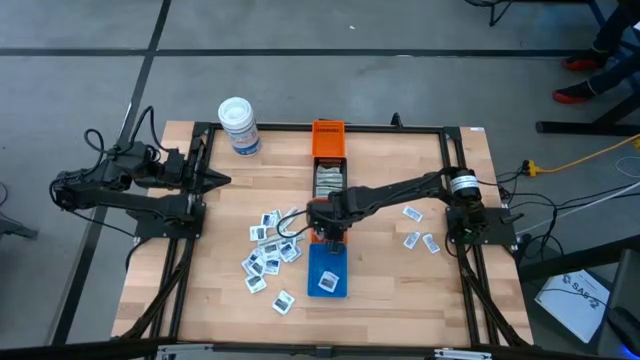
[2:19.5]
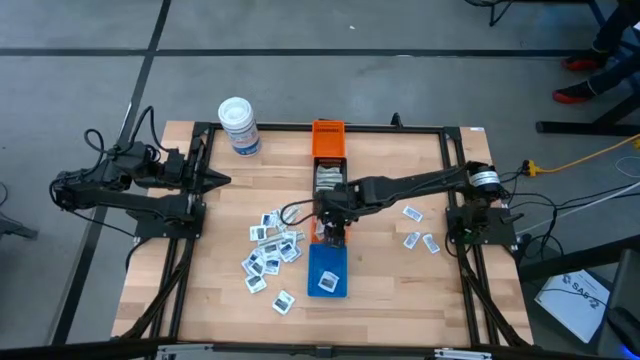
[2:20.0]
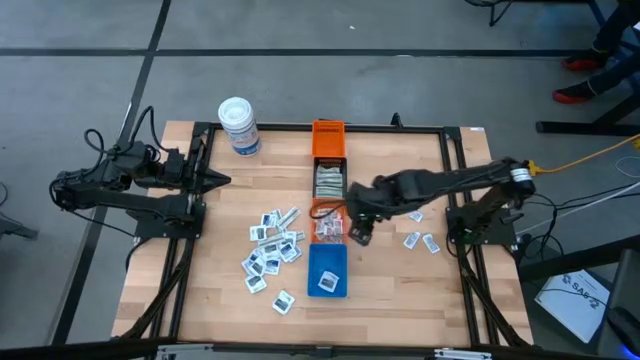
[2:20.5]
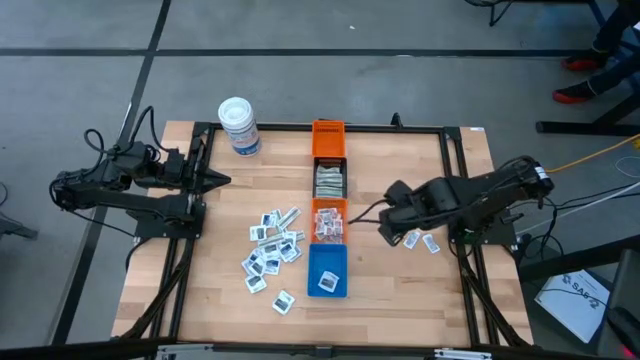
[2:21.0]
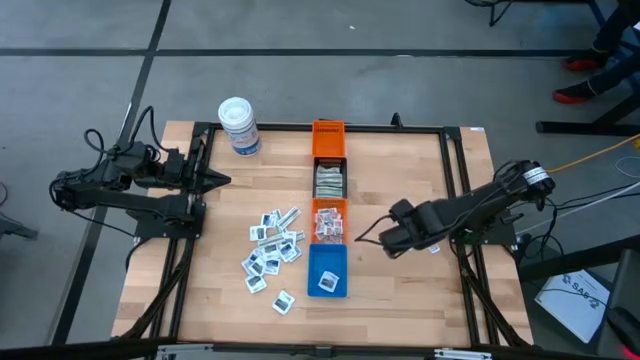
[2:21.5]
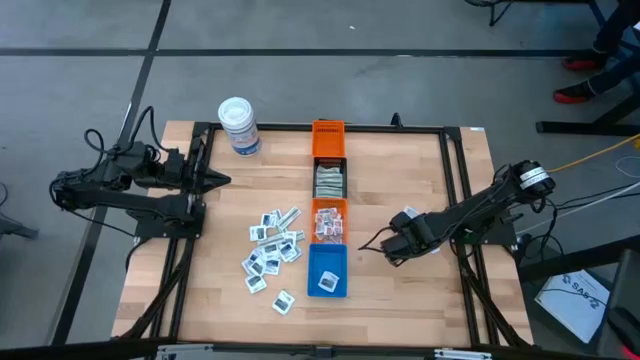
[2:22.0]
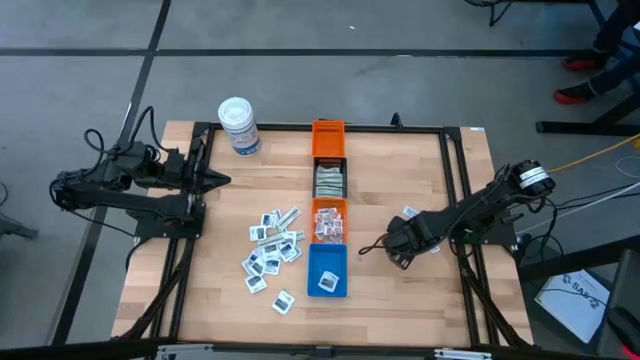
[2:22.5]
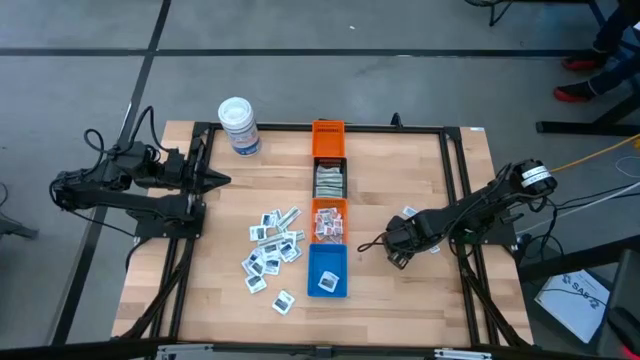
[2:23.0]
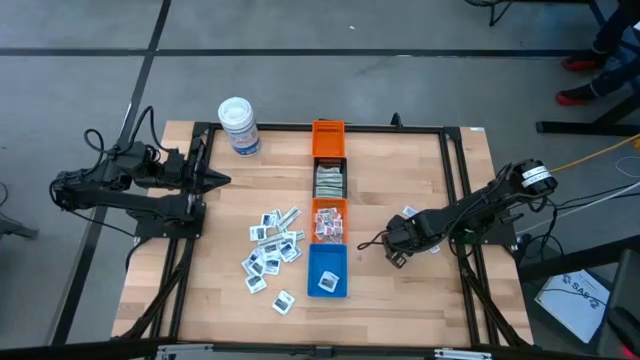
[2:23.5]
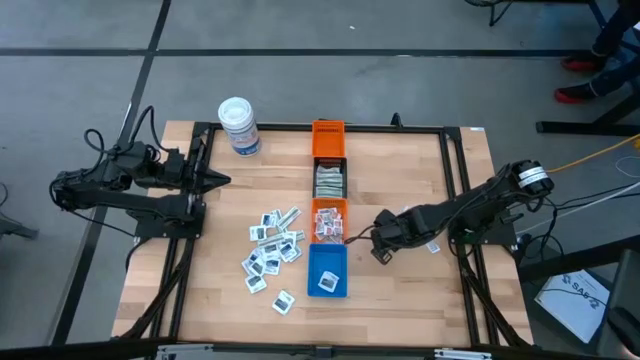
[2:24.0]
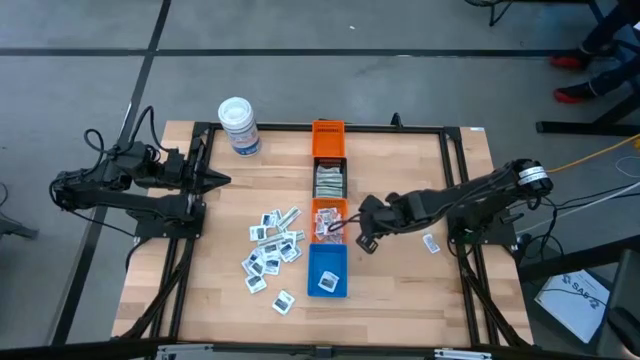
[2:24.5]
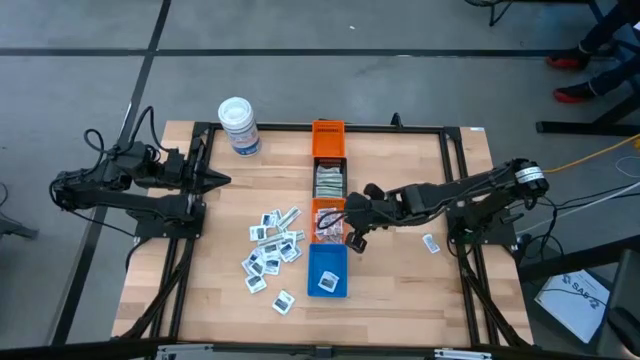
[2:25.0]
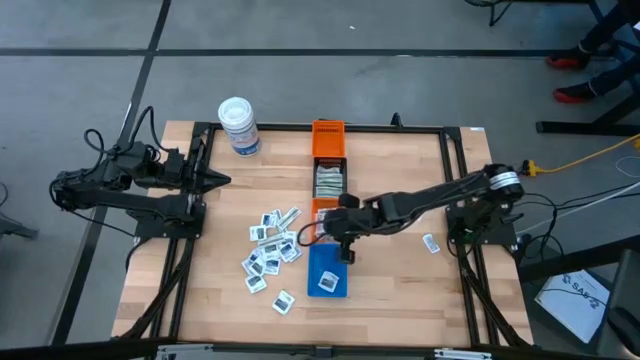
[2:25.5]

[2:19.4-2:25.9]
Task: Pick & Place First Aid Supplies
Put the orange ointment pack into the bottom orange bin

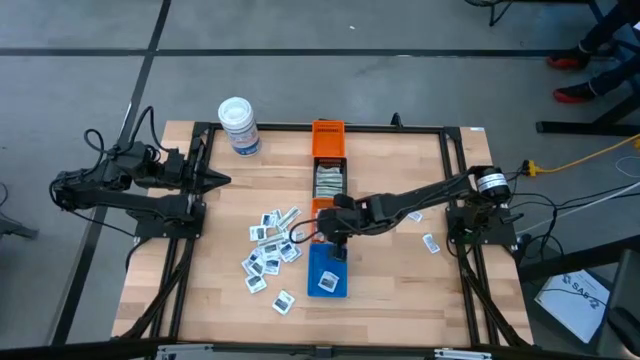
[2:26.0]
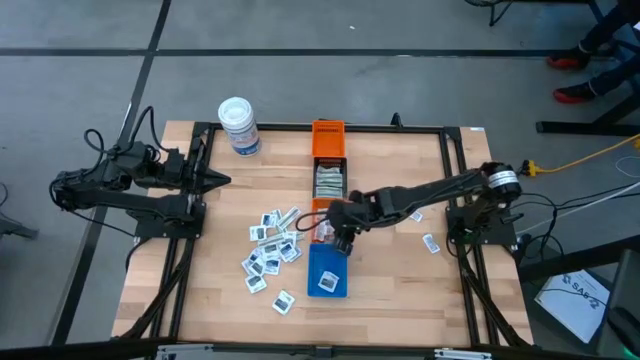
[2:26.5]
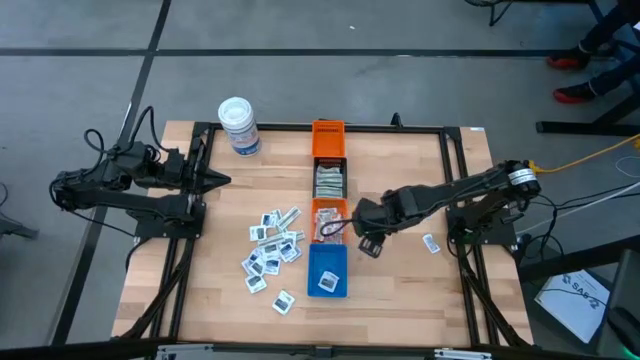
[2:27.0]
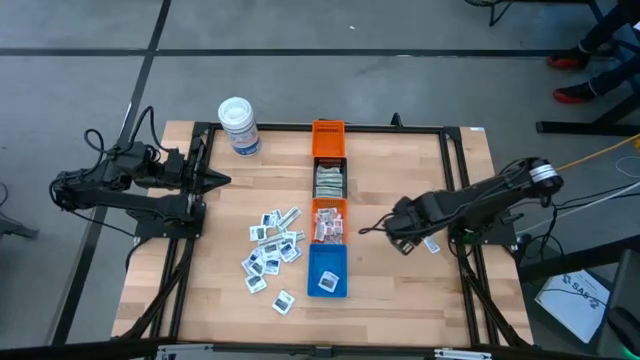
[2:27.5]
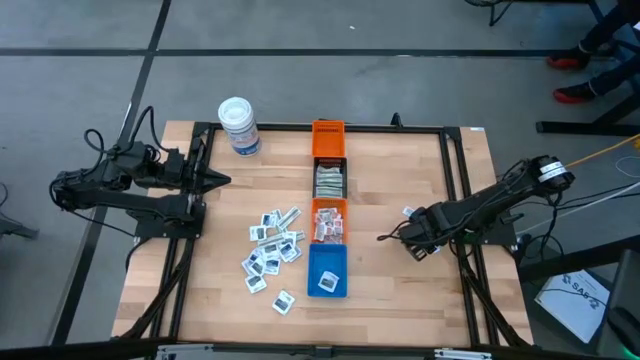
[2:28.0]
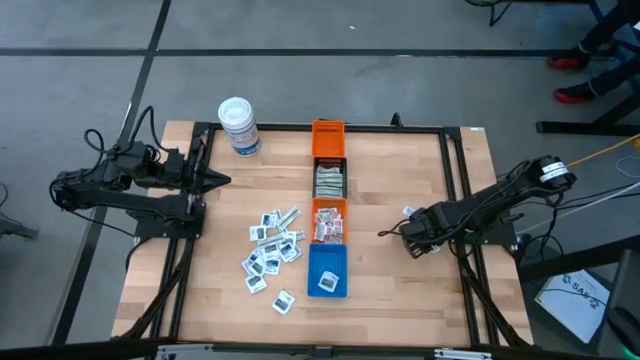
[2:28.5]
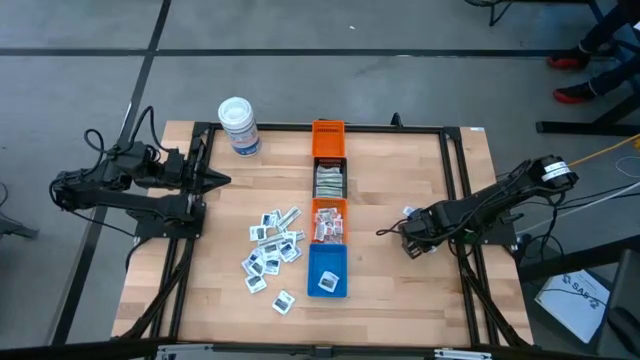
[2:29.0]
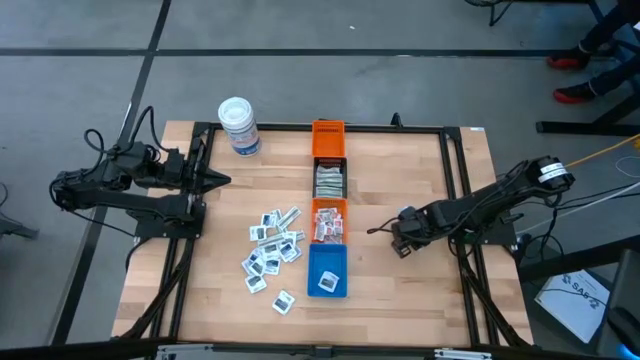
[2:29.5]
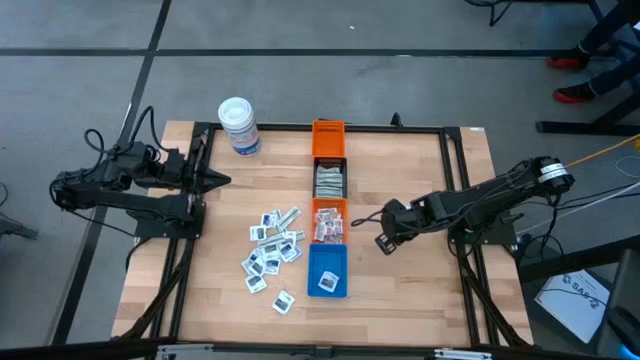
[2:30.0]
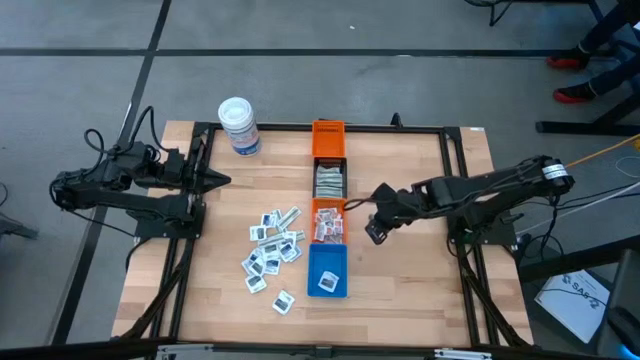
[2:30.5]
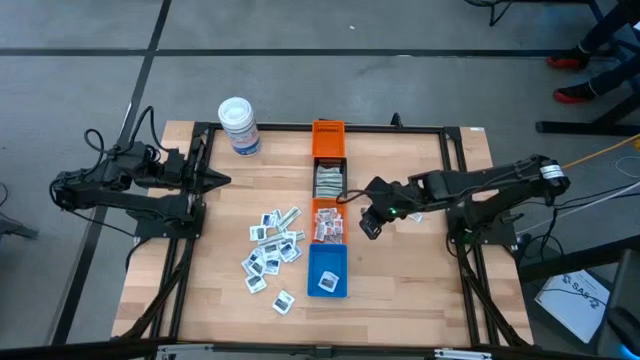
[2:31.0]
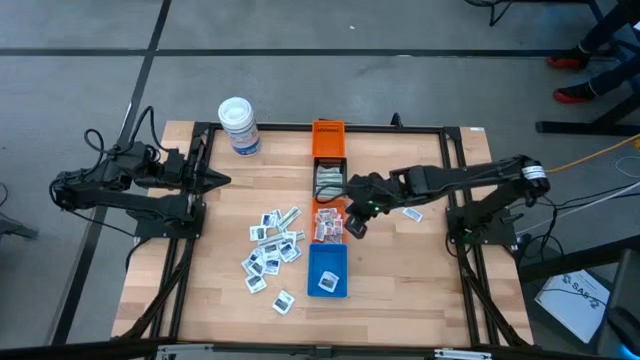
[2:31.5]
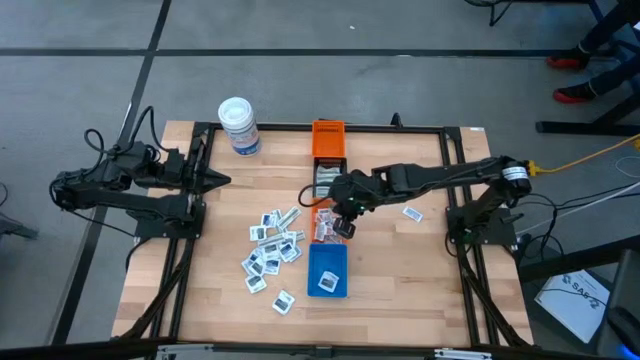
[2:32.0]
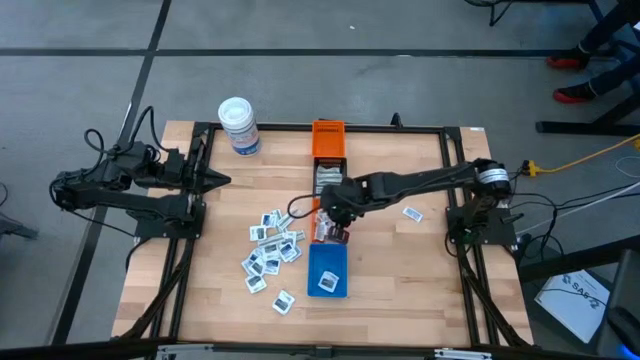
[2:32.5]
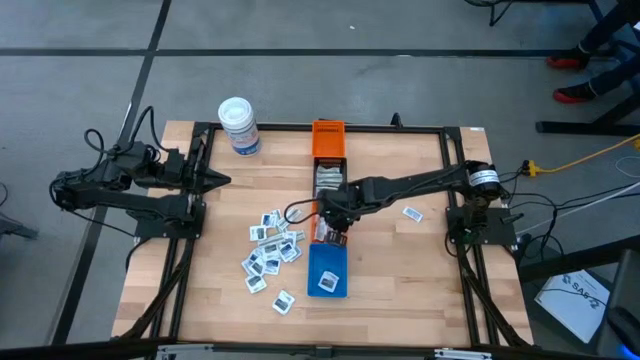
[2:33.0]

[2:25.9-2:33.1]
Put the orange ointment pack into the bottom orange bin

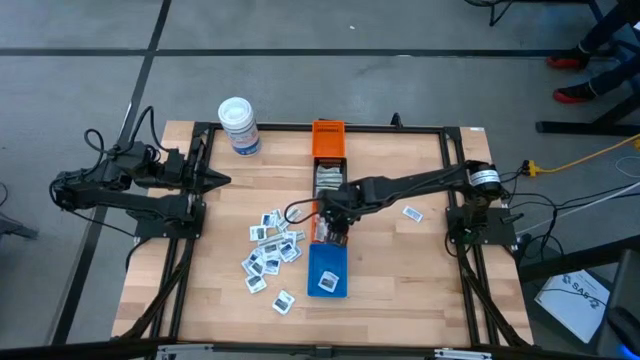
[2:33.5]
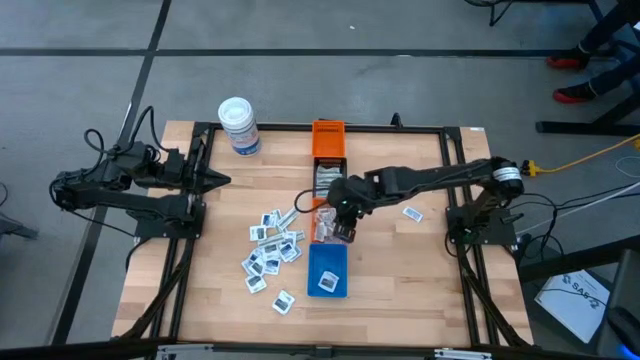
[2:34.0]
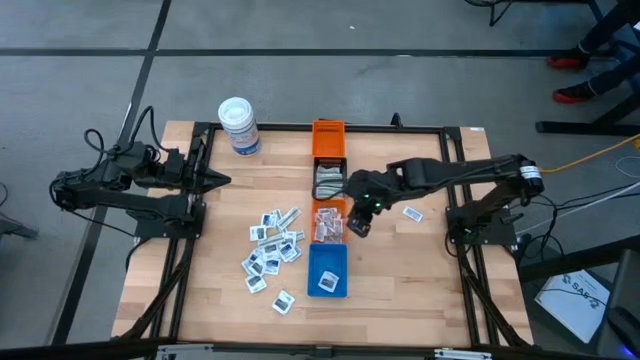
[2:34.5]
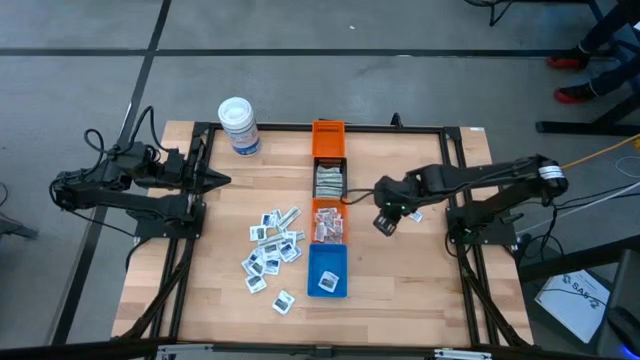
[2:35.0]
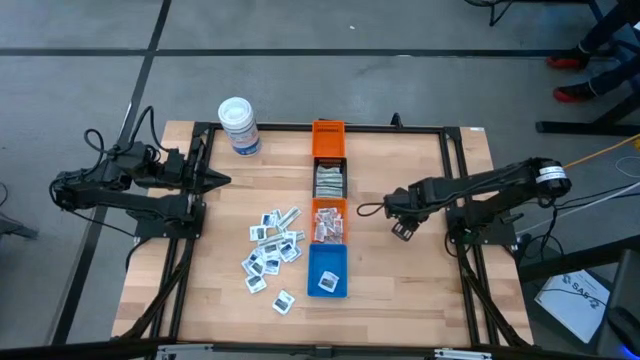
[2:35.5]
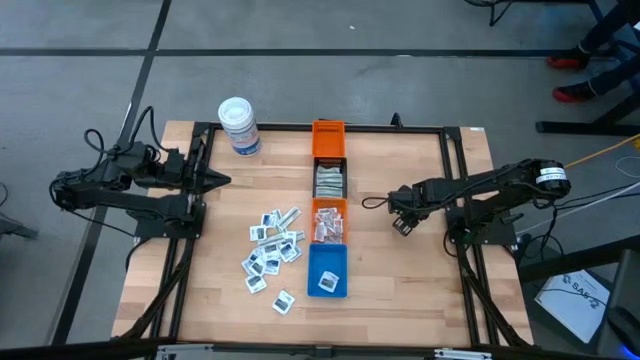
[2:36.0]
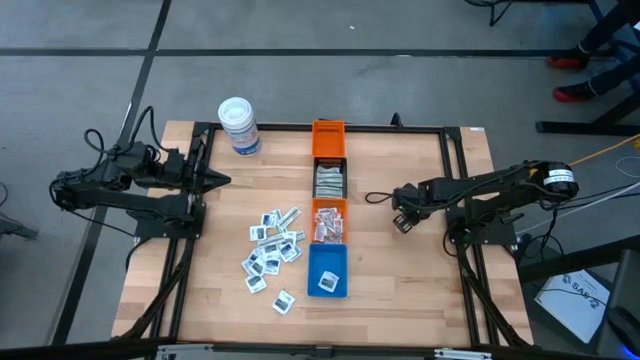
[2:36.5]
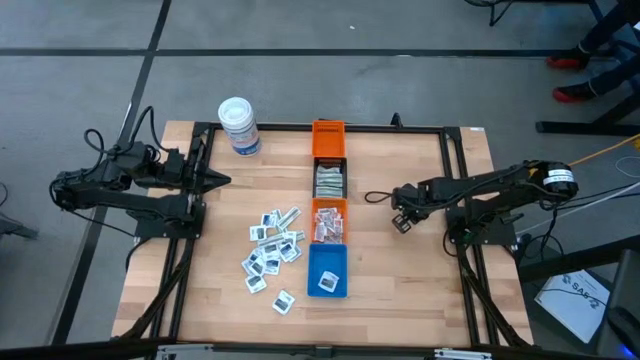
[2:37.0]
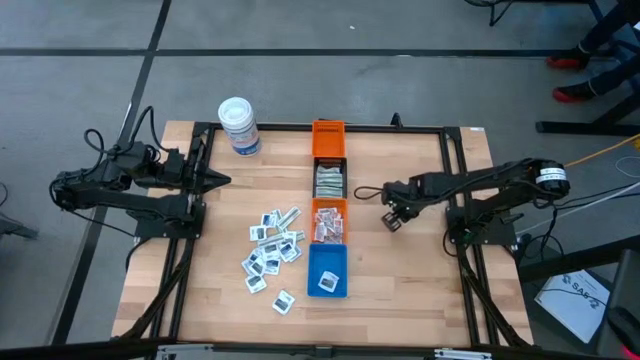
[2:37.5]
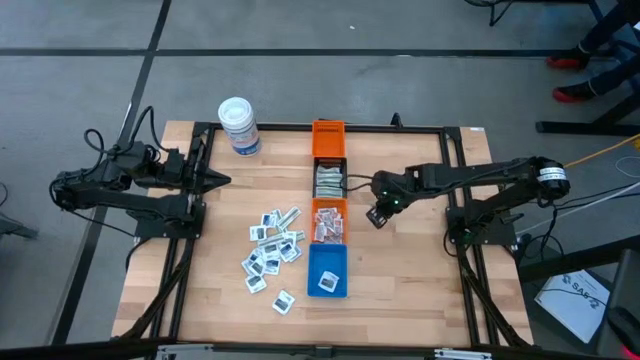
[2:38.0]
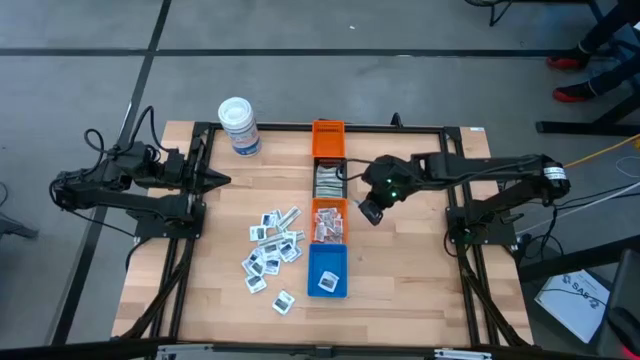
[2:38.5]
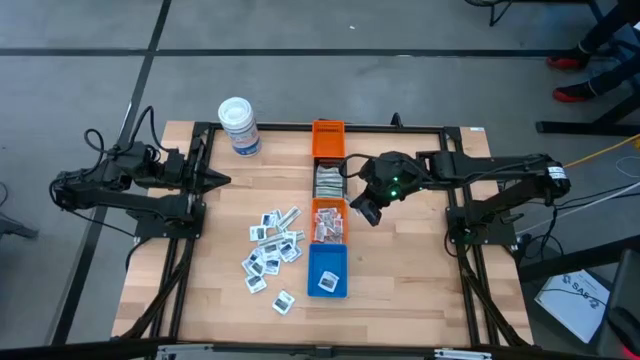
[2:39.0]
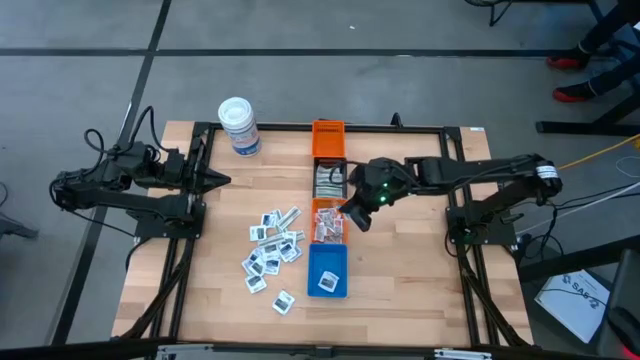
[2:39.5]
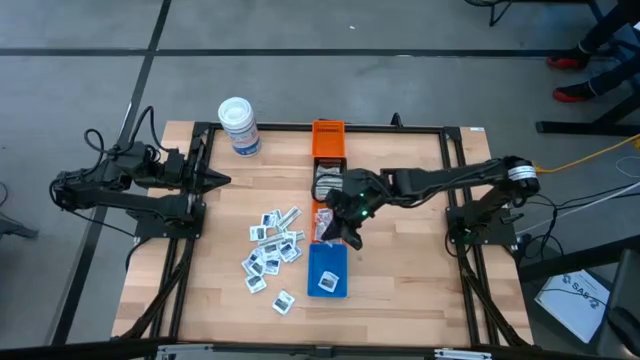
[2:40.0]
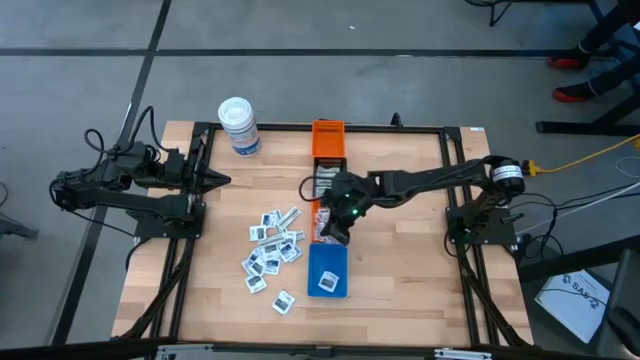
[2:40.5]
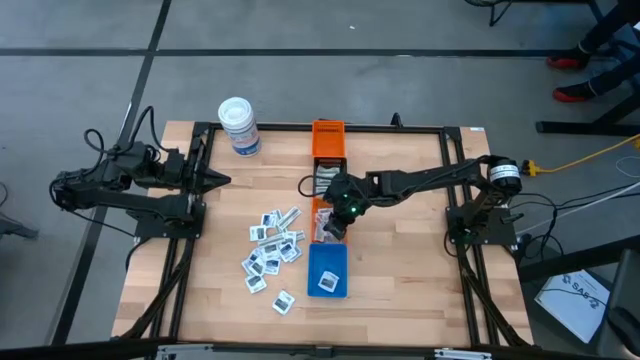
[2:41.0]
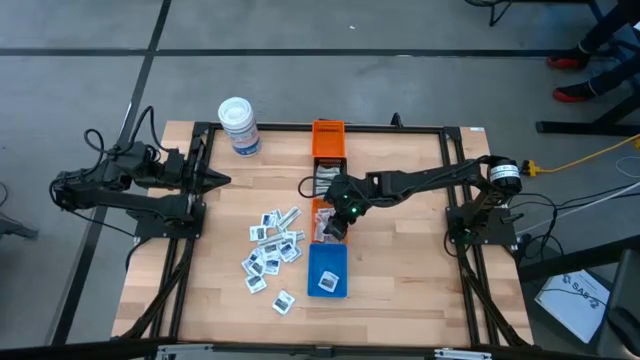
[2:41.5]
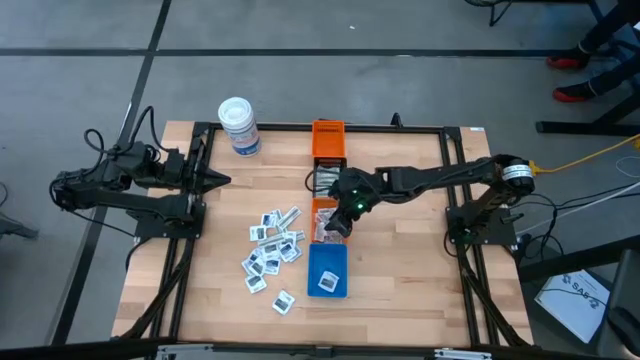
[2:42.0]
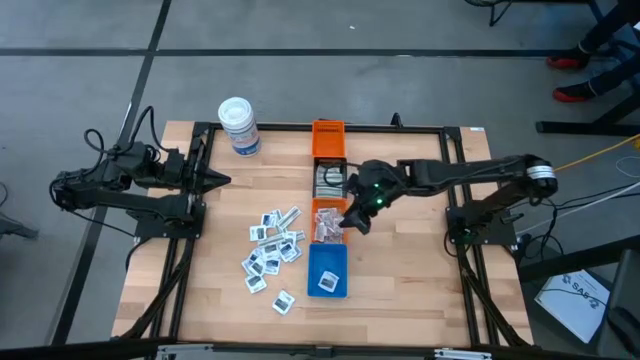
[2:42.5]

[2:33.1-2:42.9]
Put the orange ointment pack into the bottom orange bin
